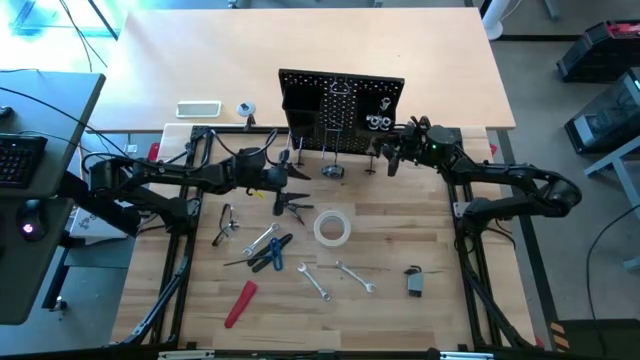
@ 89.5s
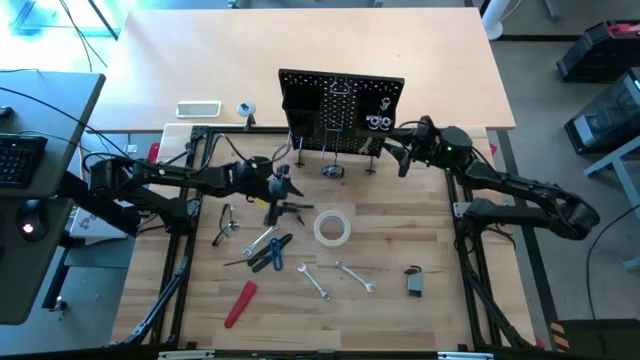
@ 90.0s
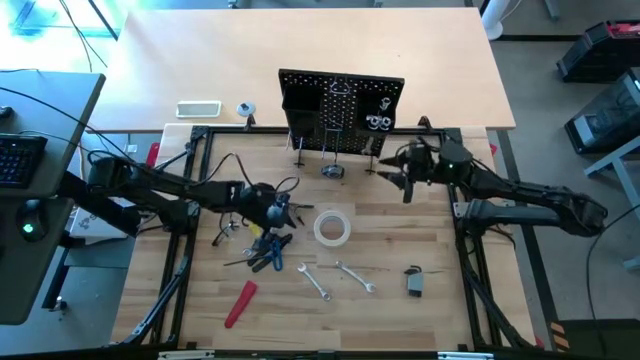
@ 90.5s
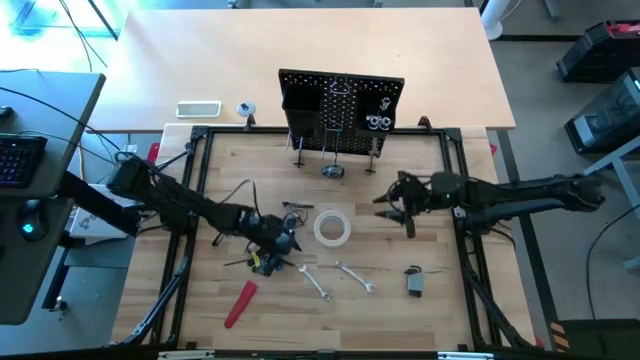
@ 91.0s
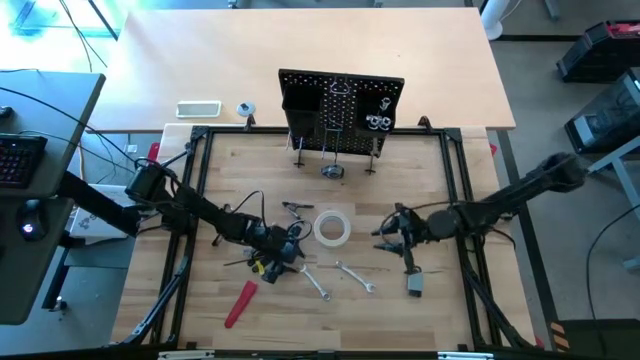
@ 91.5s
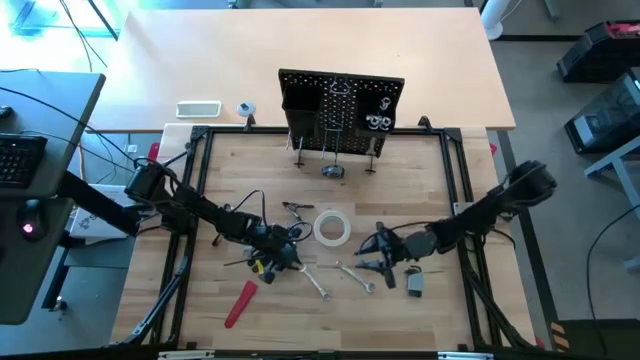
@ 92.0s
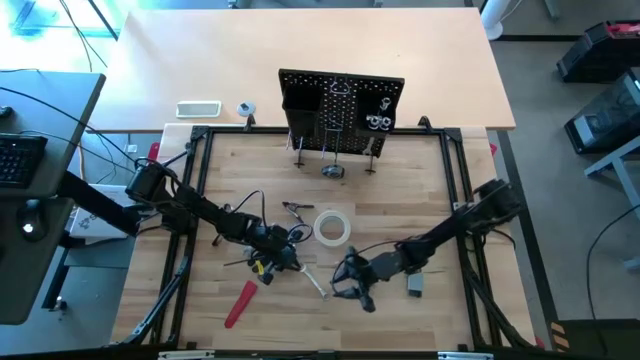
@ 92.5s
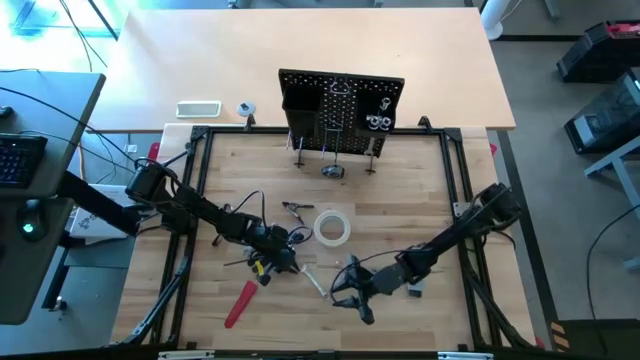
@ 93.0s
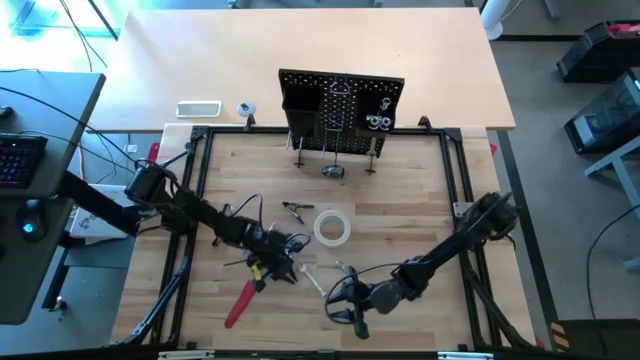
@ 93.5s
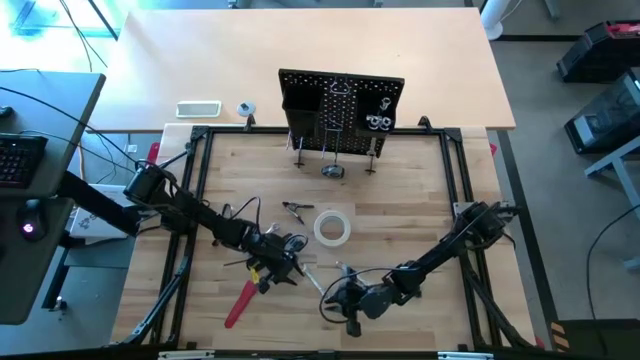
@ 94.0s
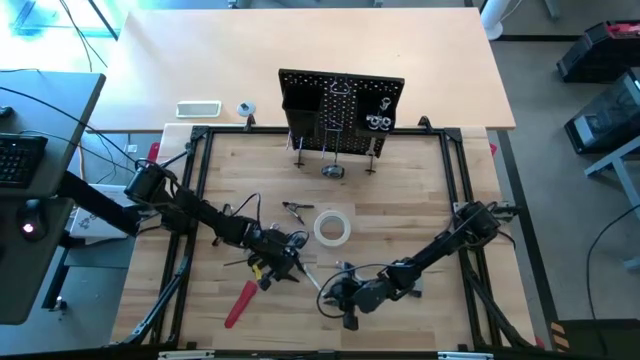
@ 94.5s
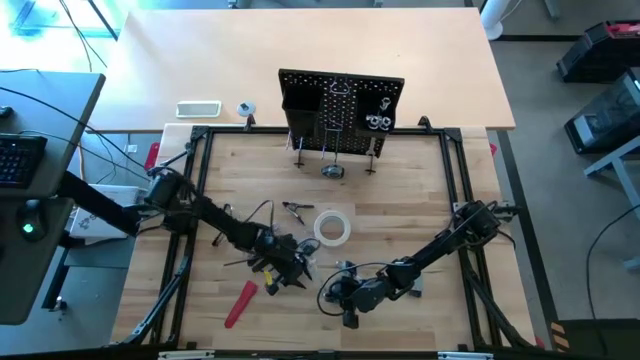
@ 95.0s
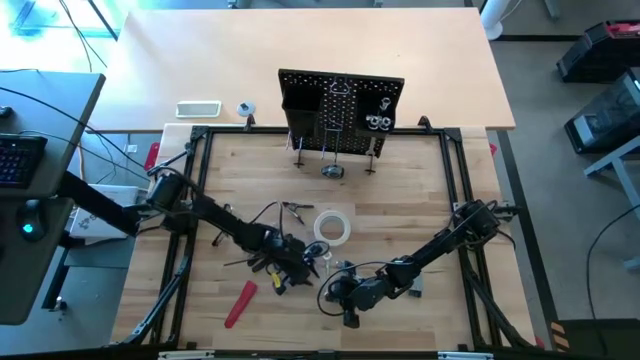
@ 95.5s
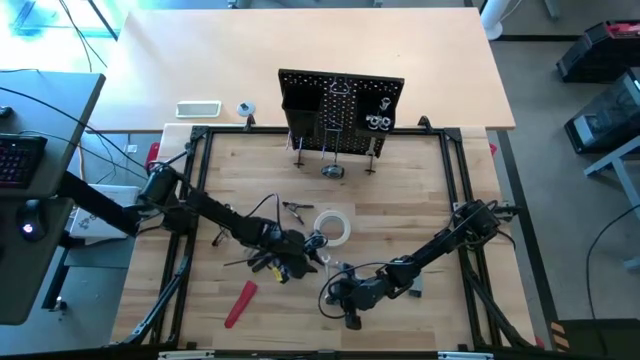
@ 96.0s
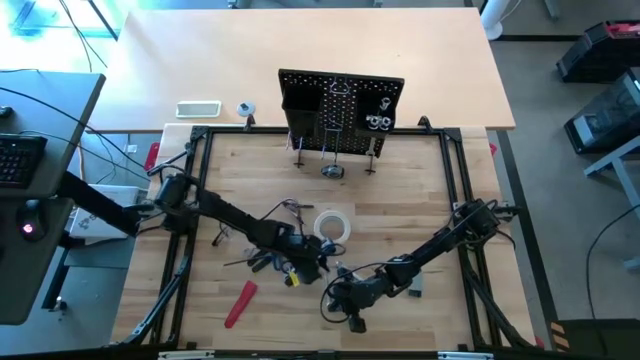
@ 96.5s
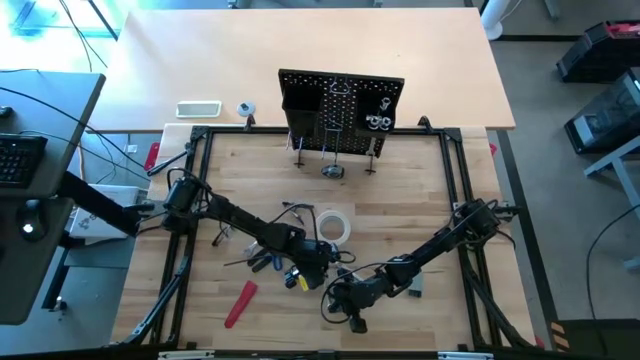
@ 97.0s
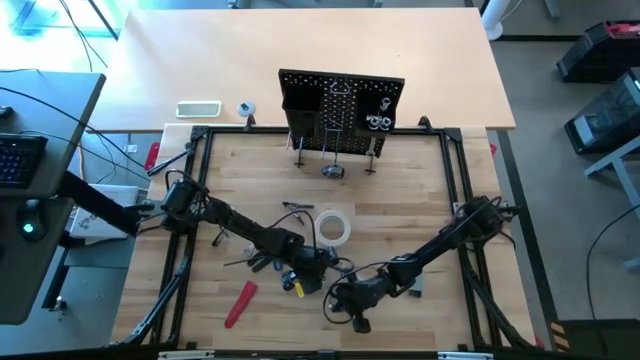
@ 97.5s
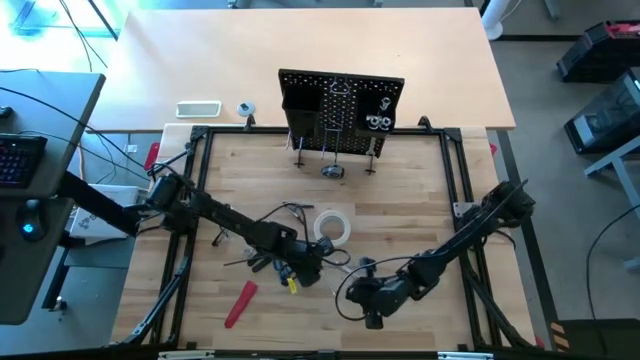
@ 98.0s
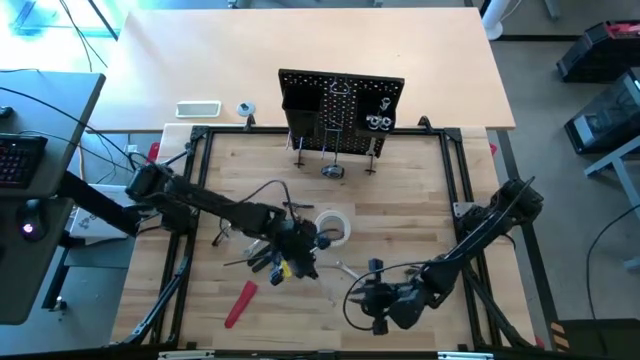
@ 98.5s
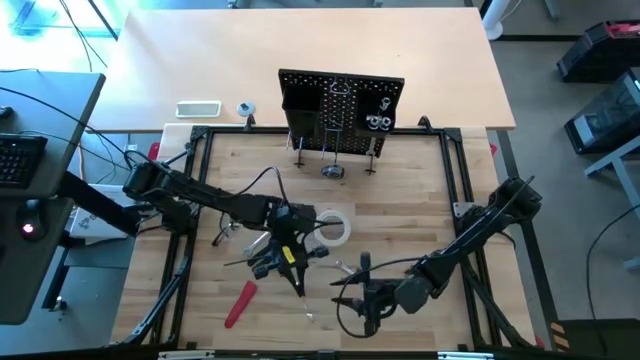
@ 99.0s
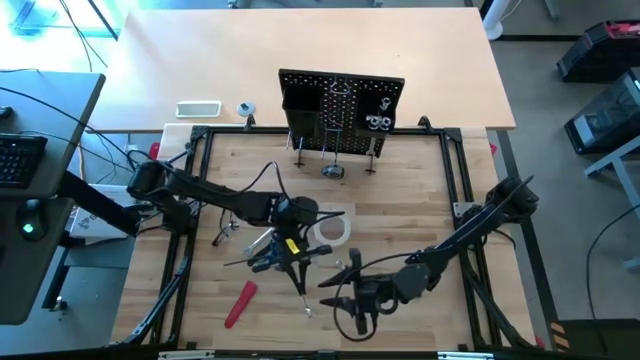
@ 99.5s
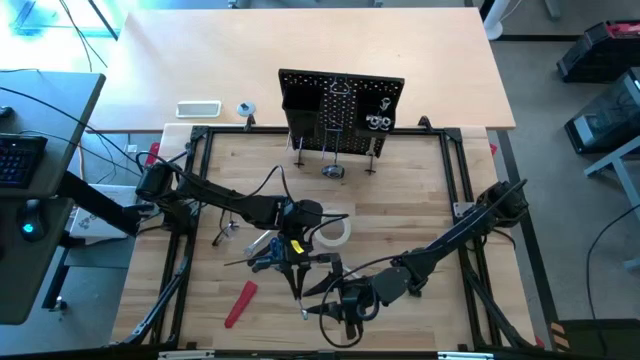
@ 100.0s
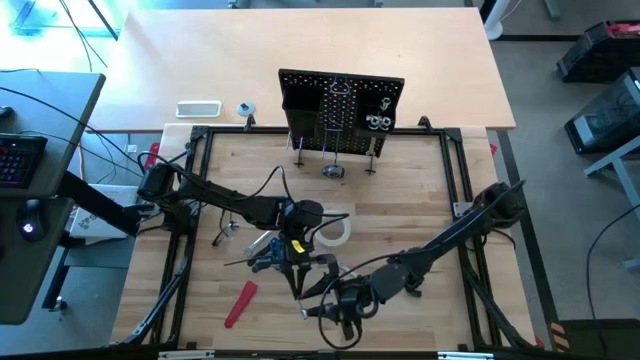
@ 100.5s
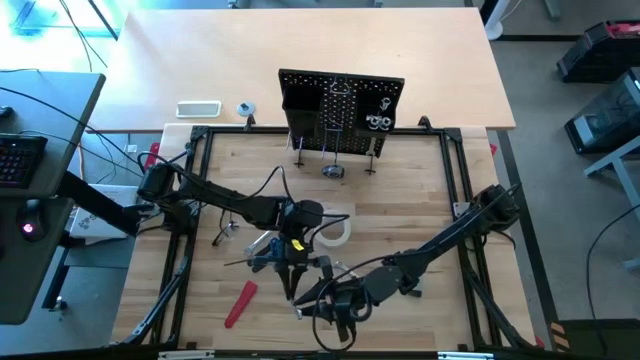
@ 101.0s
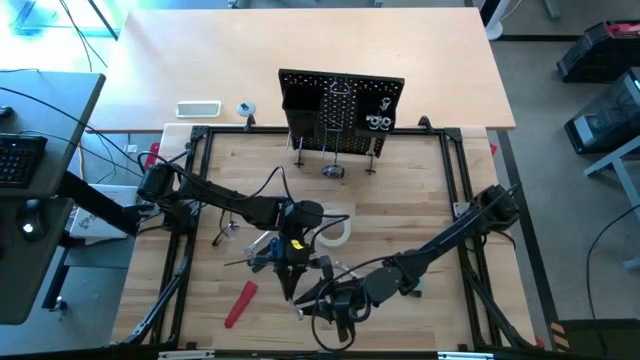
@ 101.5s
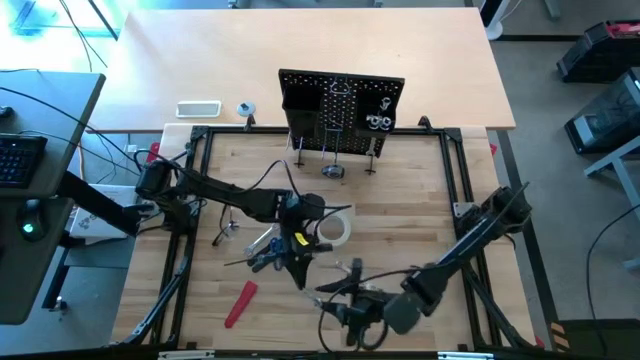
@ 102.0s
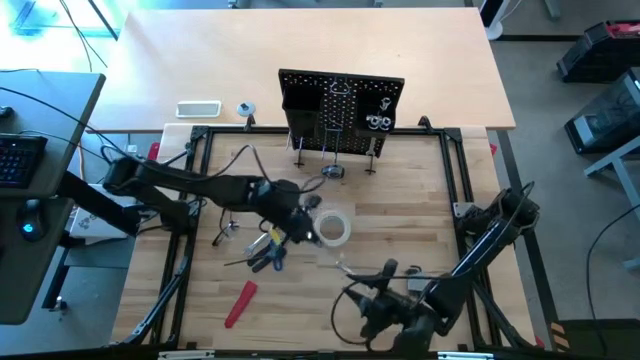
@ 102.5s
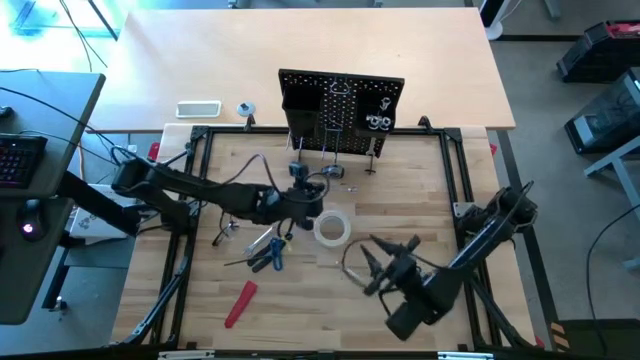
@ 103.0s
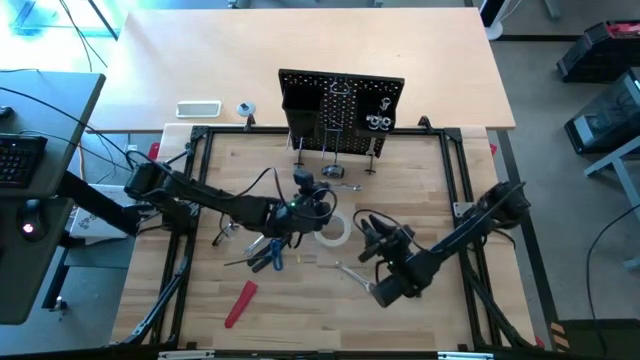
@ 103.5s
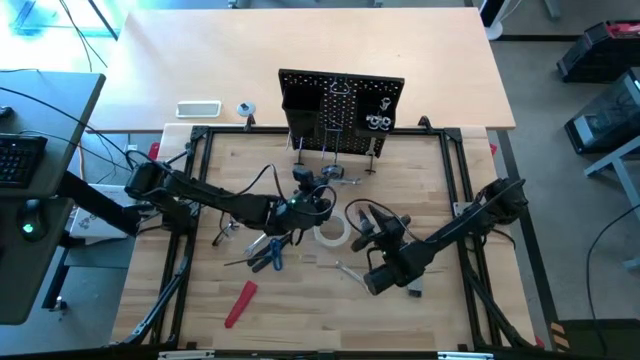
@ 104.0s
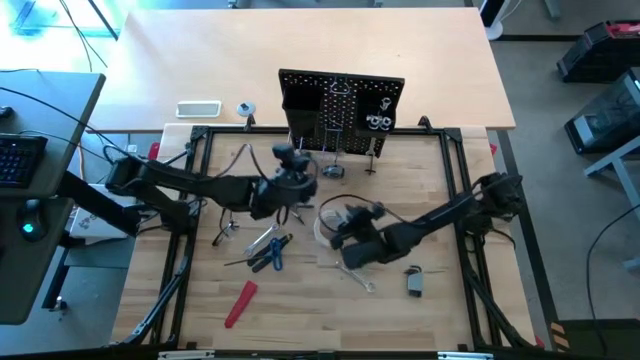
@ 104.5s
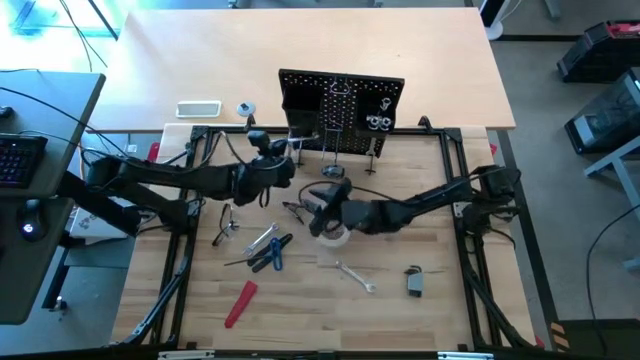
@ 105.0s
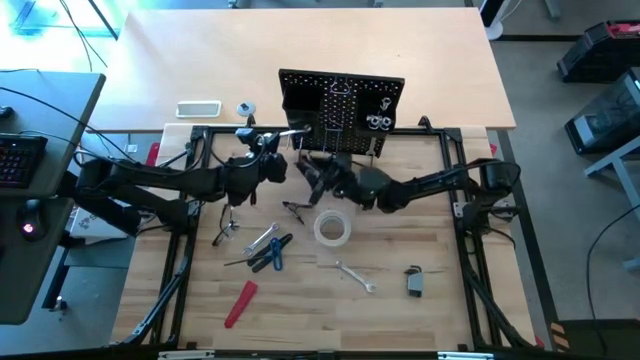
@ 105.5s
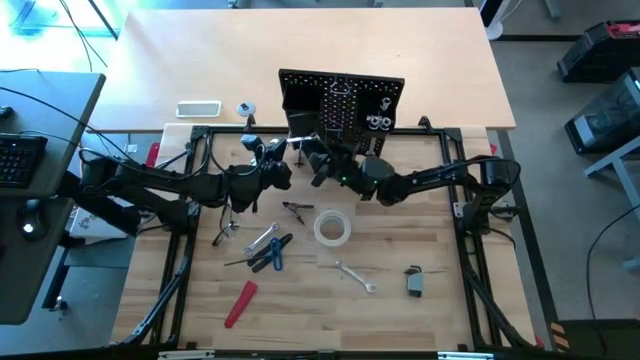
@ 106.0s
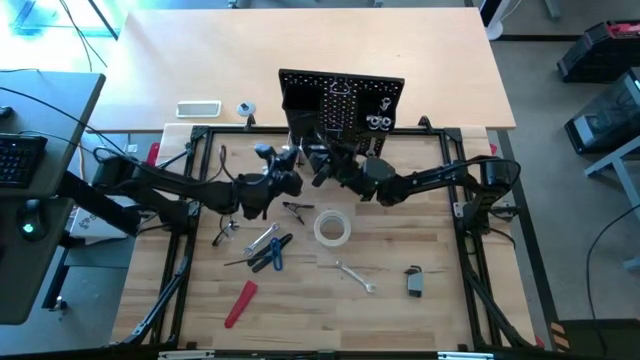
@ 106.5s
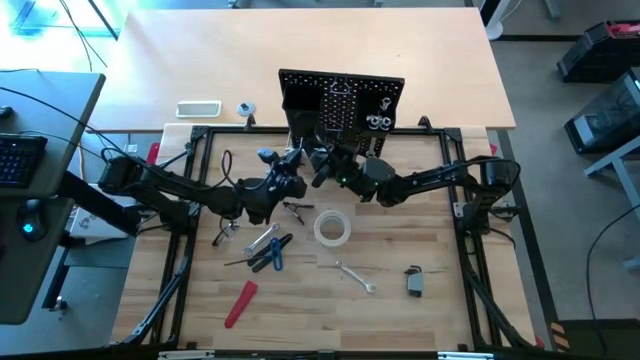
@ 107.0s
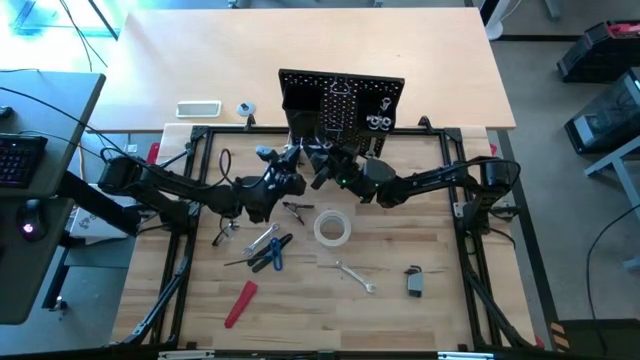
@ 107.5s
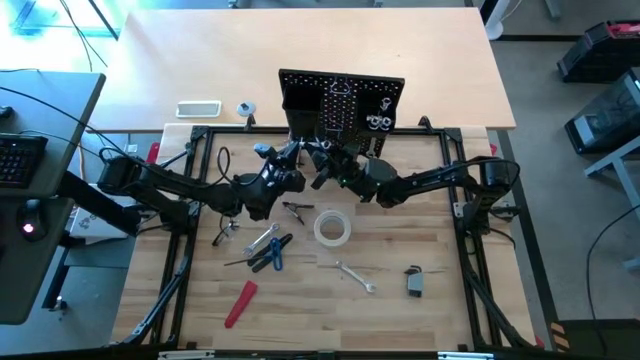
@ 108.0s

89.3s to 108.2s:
Task: Hang tools onto peg board
Hang the silver wrench on the peg board

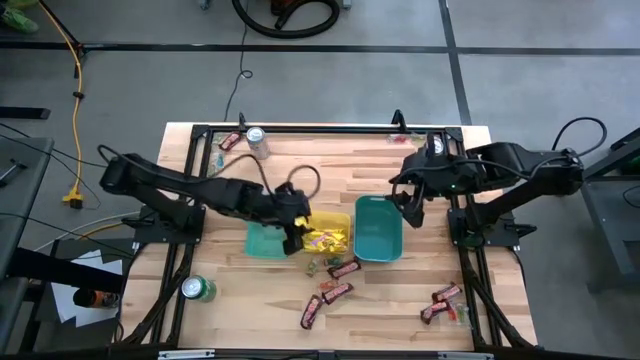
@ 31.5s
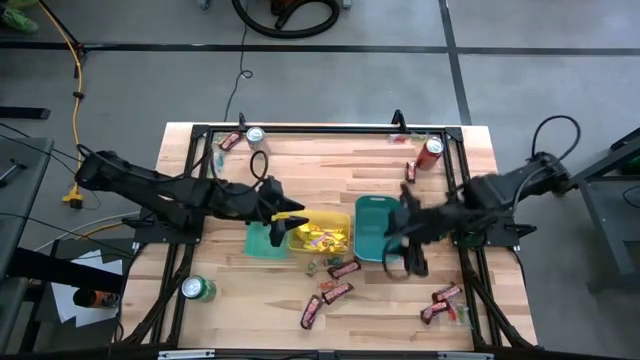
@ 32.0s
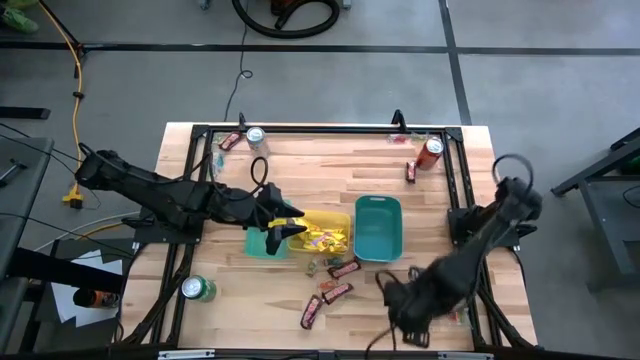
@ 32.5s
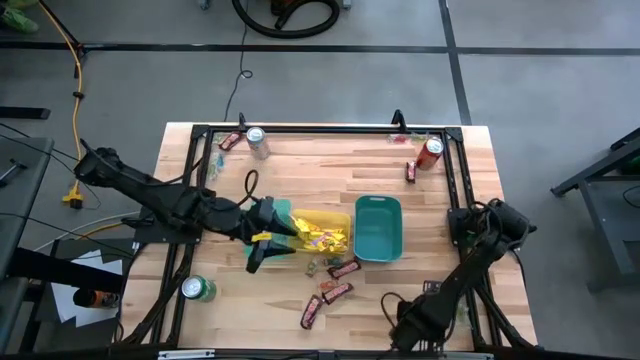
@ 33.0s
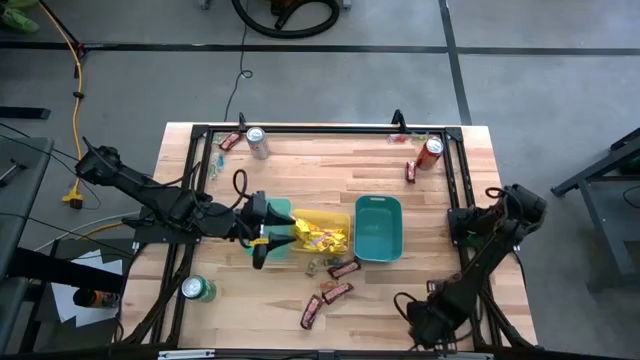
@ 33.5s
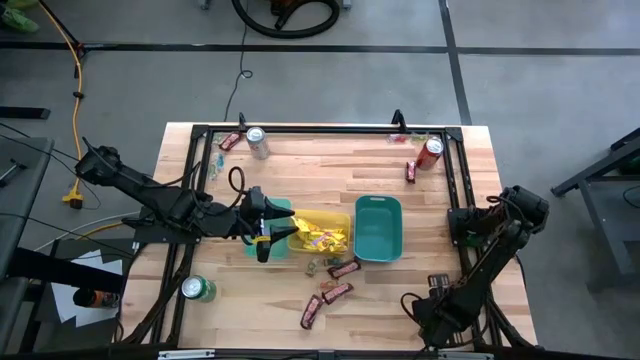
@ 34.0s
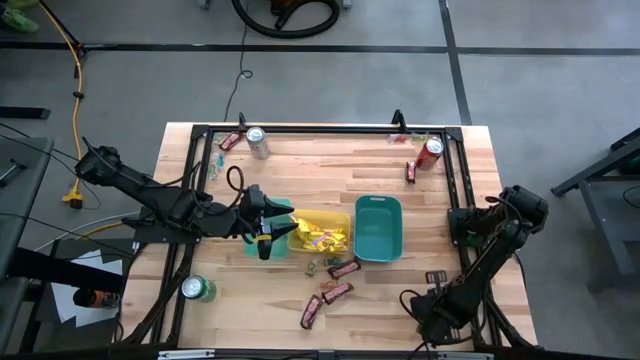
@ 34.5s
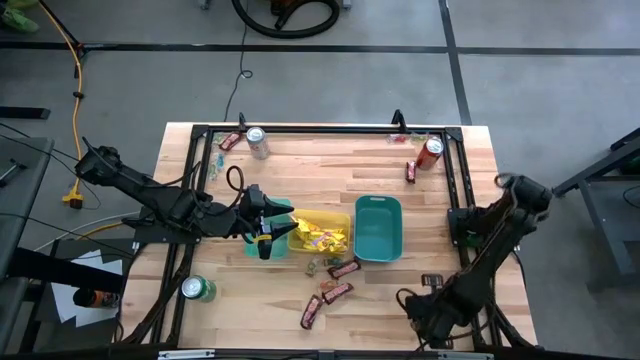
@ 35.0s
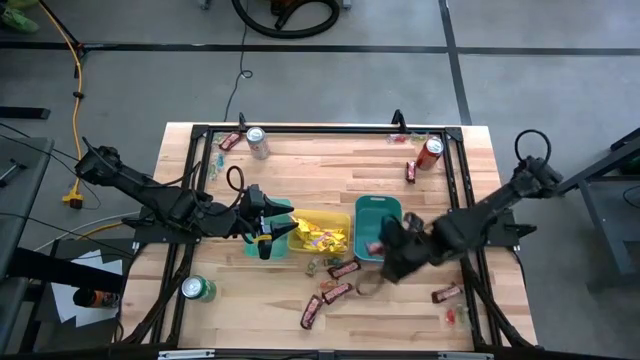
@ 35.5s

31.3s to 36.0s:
Task: Sort candy
Put the brown chocolate bar into the blue bin
